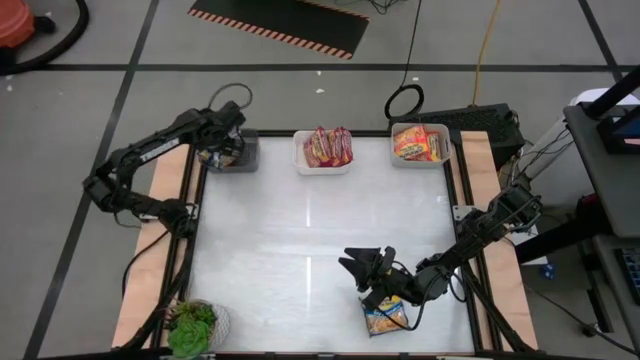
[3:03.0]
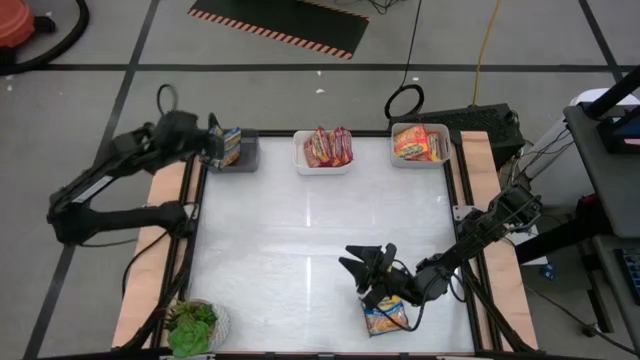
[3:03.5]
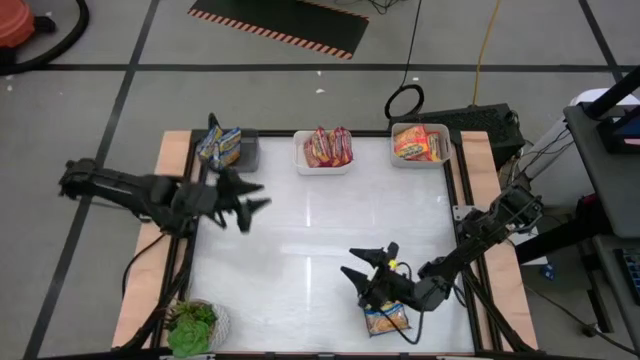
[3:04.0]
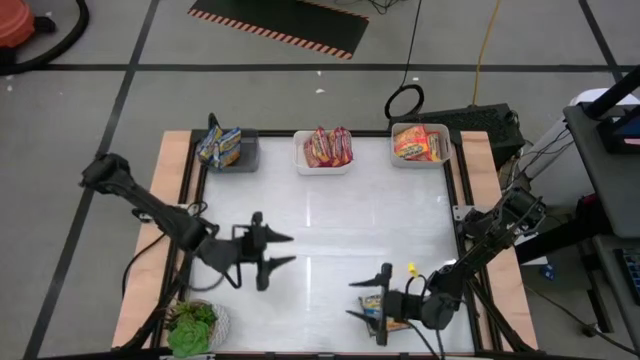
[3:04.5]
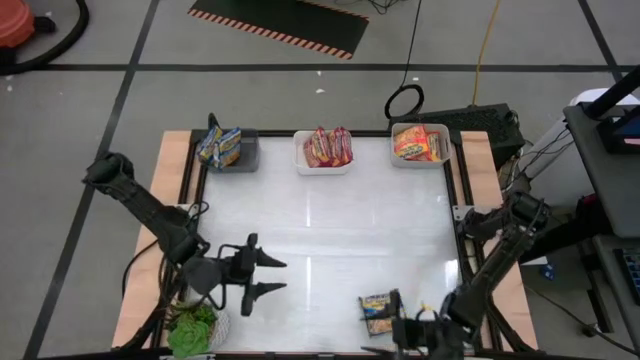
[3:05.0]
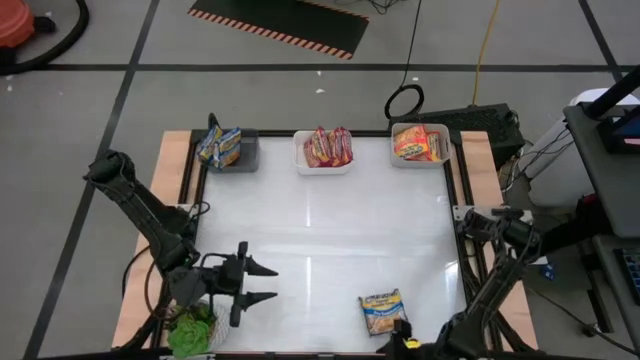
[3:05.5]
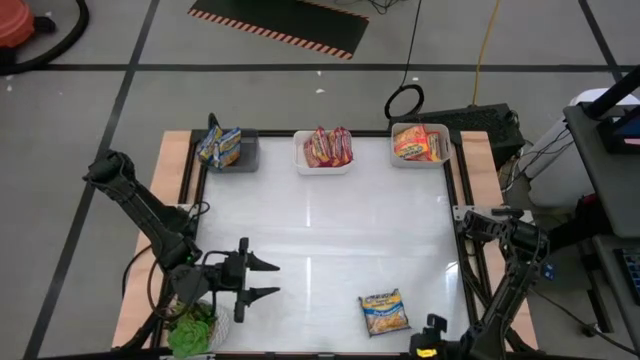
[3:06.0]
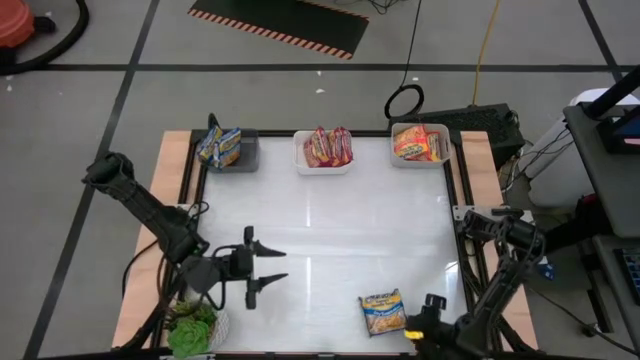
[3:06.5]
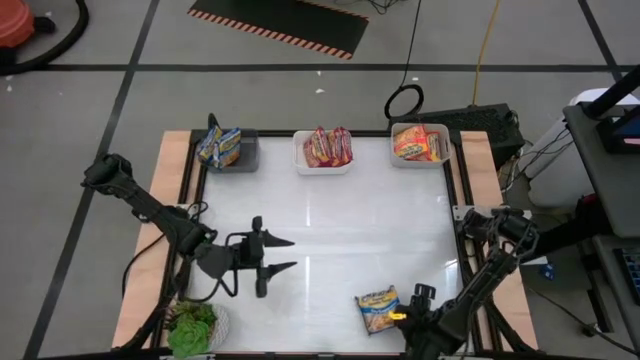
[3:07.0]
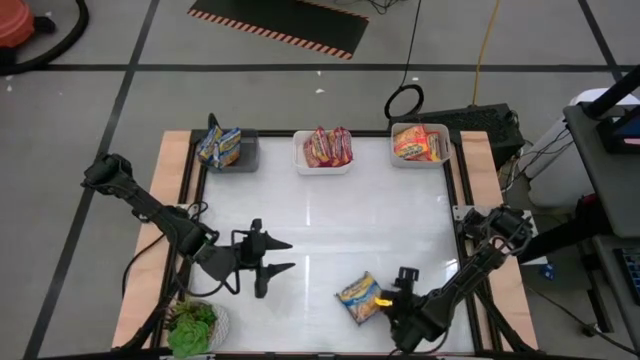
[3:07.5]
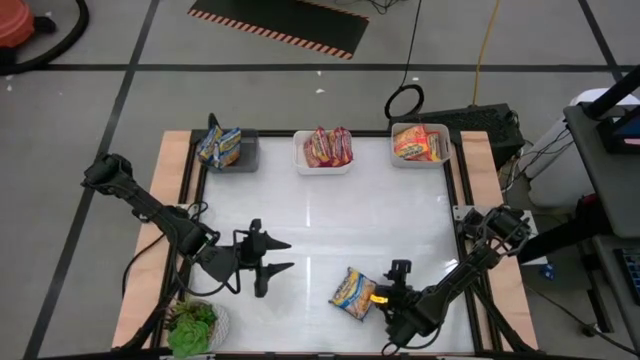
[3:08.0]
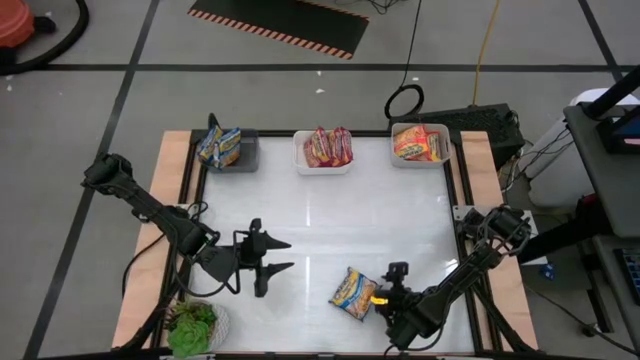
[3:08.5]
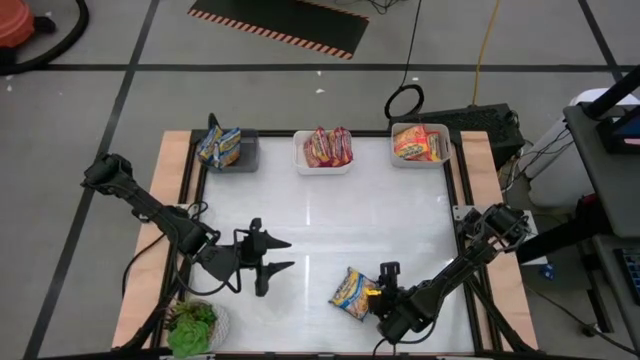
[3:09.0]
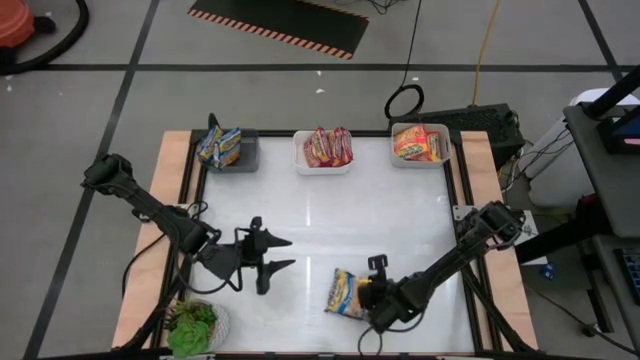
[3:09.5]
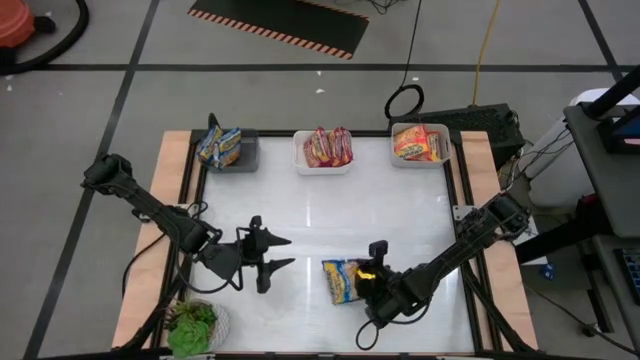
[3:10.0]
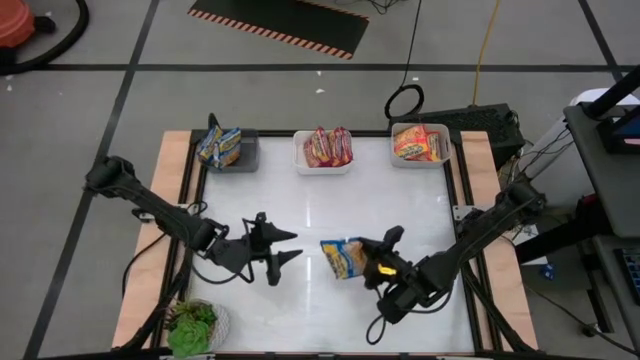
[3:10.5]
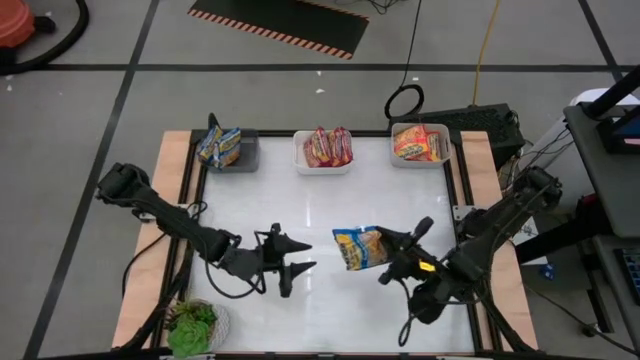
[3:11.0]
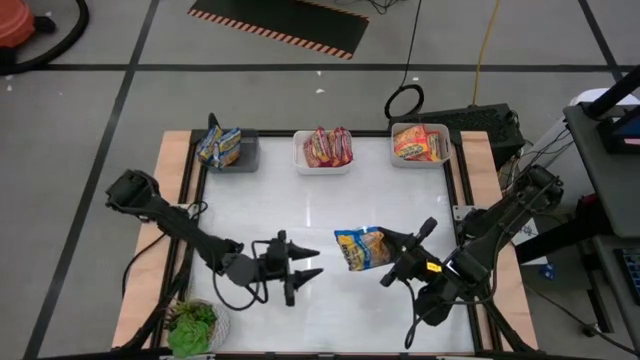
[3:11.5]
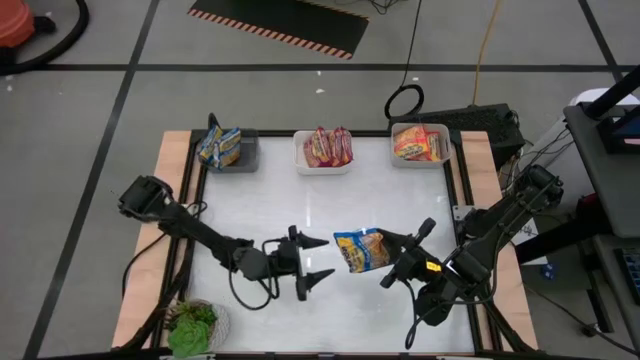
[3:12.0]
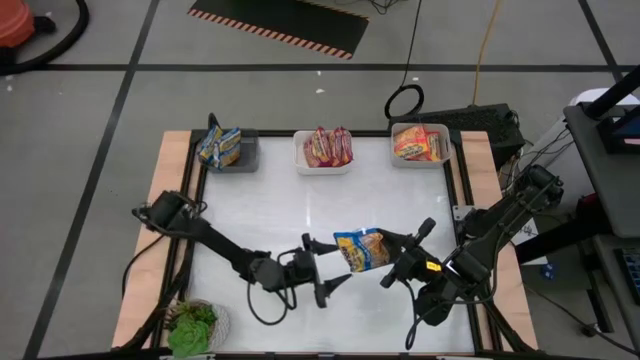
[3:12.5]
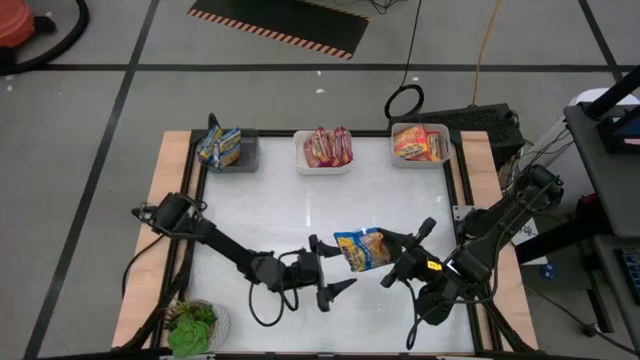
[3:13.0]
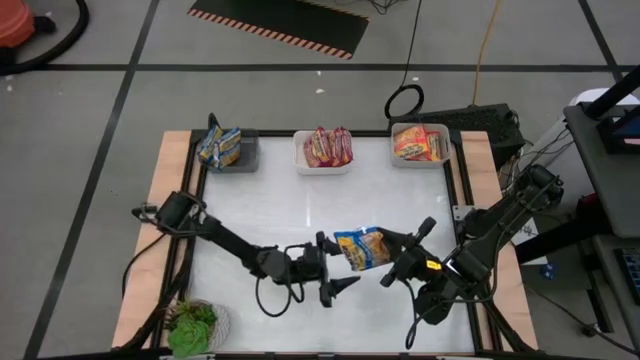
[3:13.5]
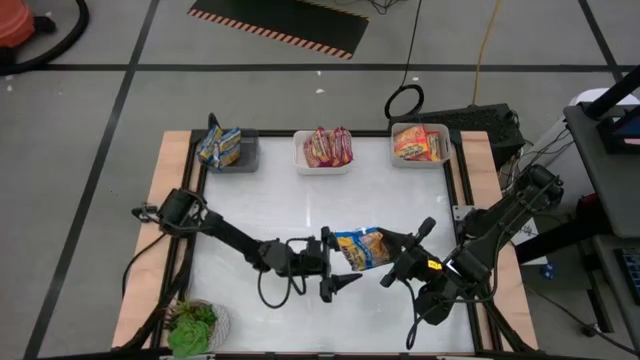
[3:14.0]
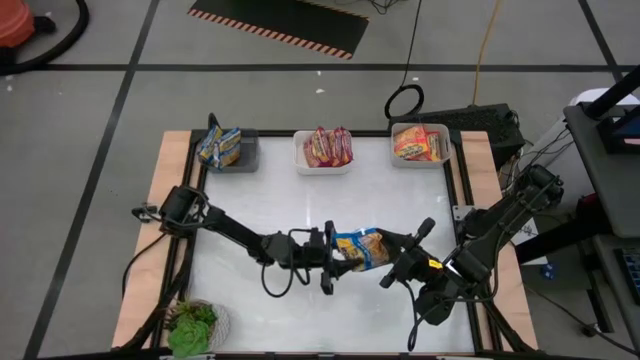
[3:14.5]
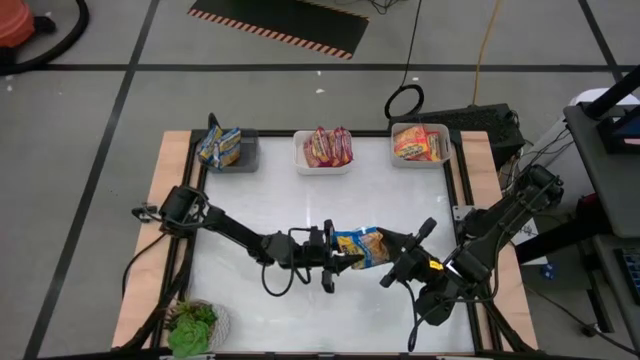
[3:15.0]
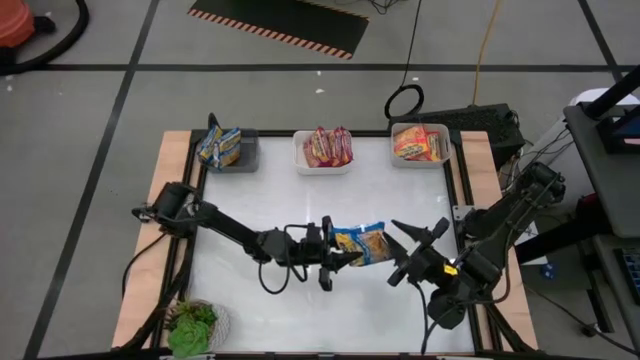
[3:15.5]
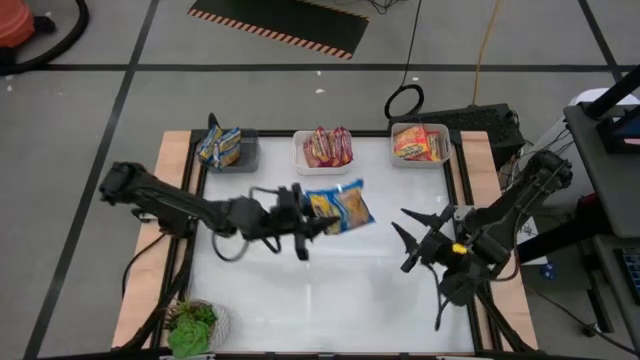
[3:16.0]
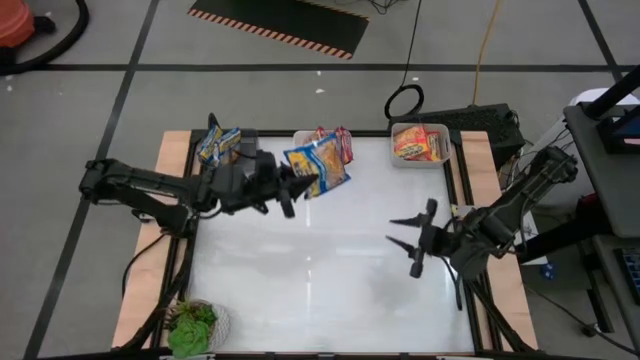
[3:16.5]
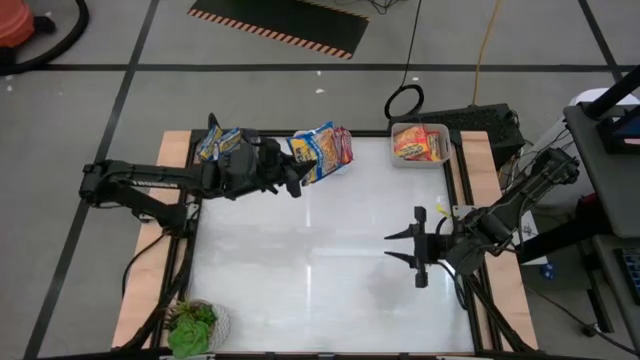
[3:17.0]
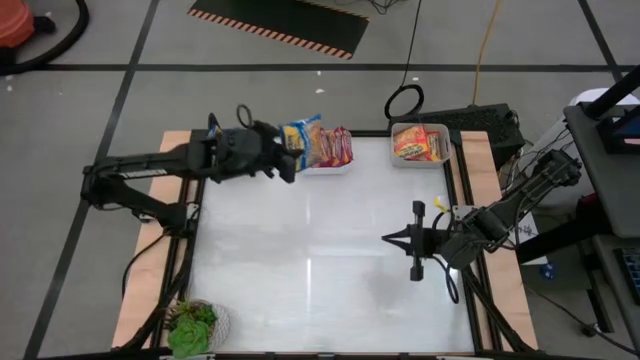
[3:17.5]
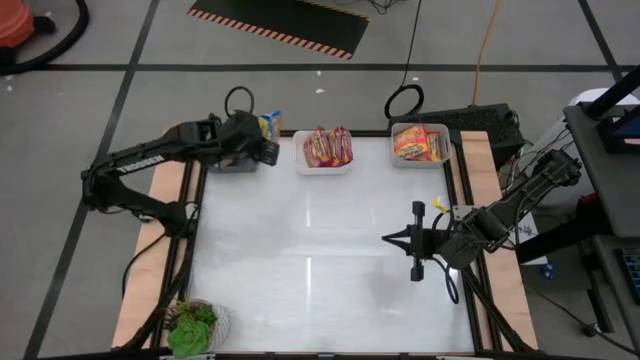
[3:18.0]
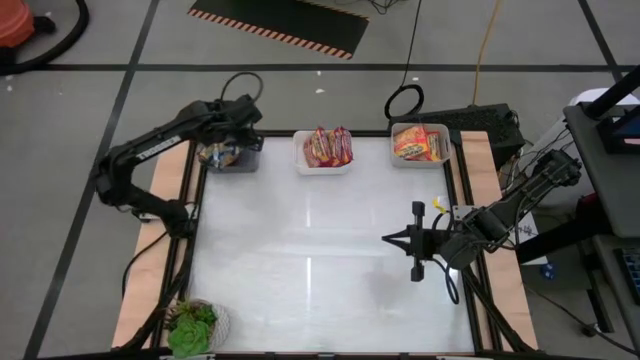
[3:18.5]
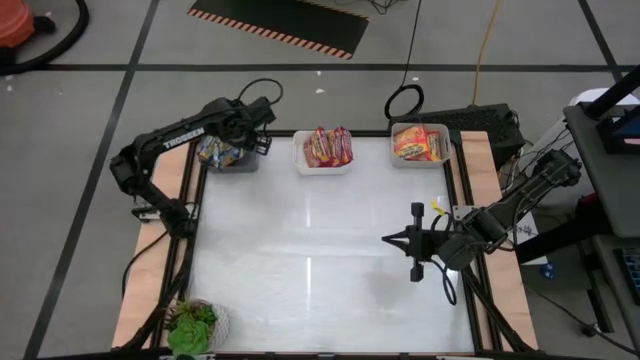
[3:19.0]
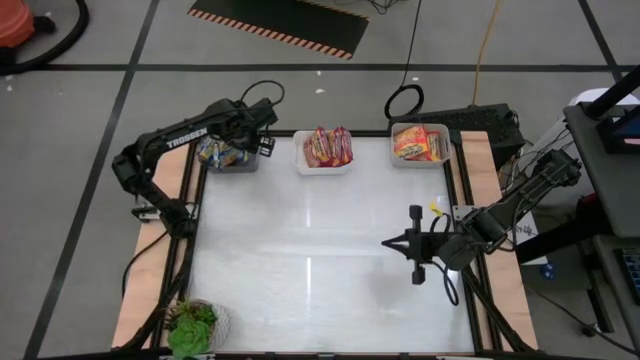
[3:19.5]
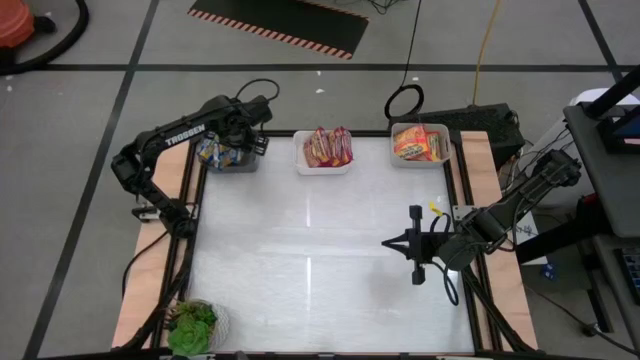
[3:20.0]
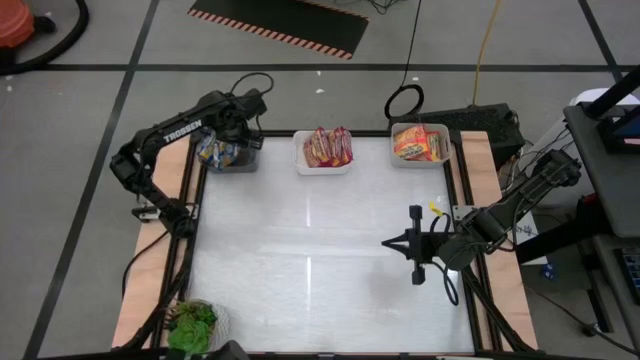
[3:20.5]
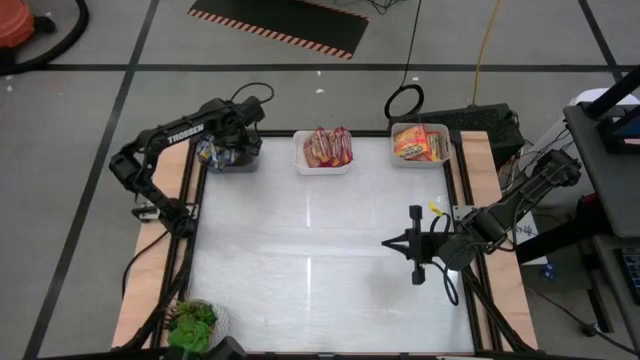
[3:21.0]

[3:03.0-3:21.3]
Task: Sort Maruchan noodles
Put the blue noodle pack into the black bin
